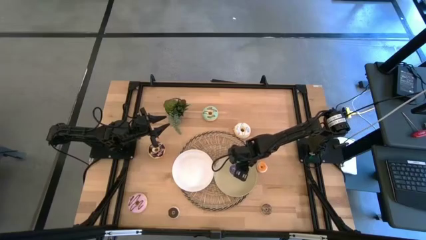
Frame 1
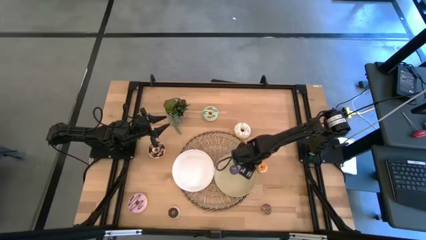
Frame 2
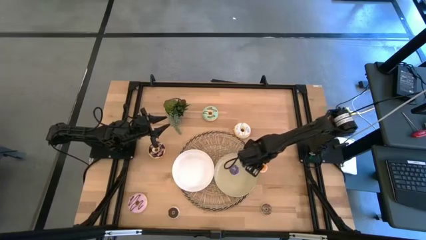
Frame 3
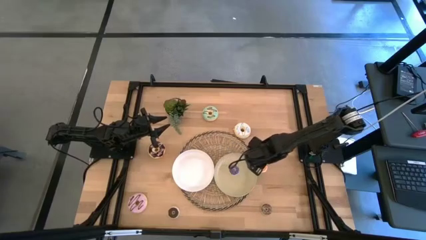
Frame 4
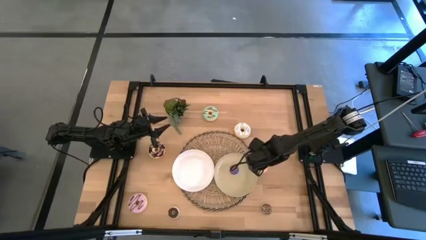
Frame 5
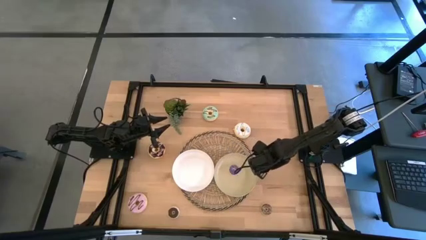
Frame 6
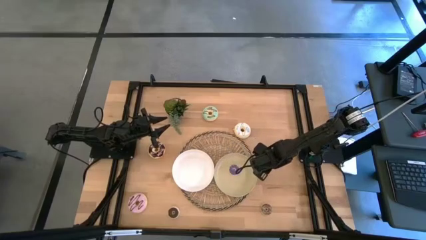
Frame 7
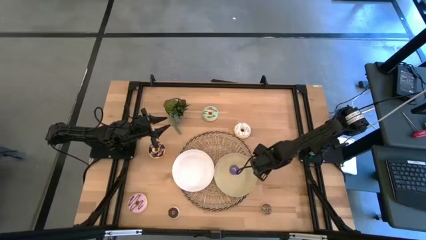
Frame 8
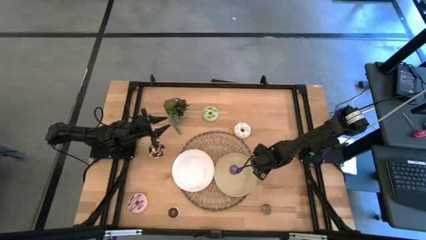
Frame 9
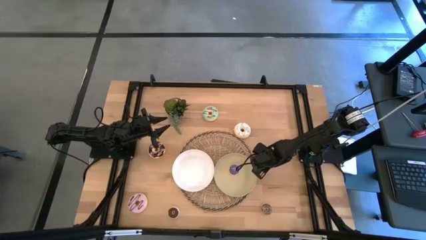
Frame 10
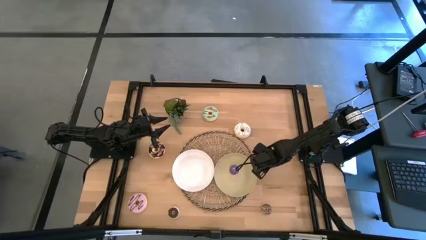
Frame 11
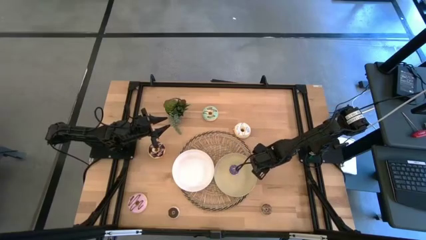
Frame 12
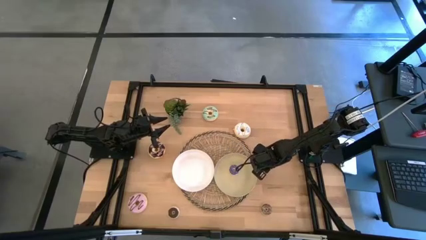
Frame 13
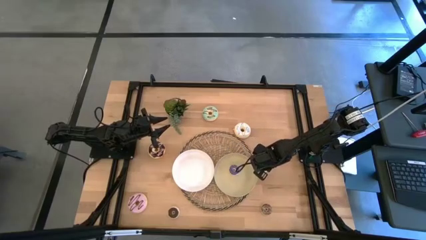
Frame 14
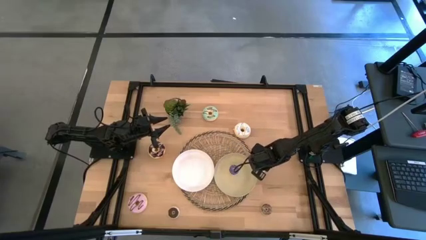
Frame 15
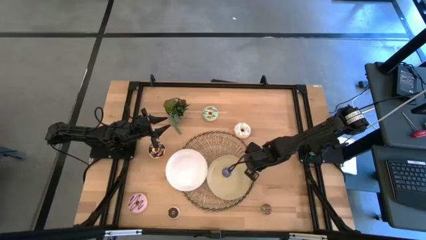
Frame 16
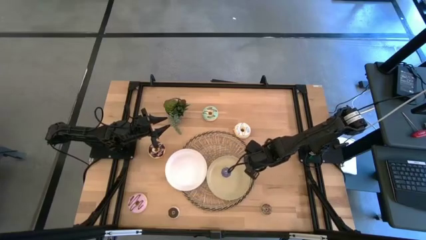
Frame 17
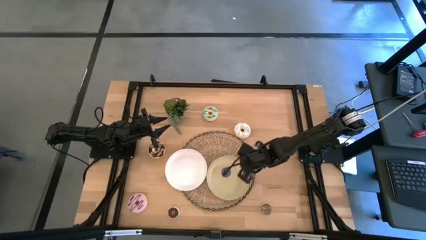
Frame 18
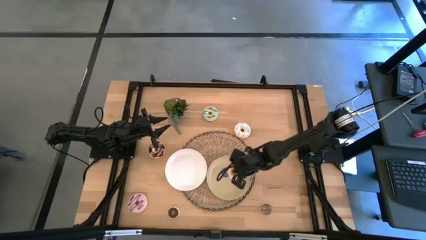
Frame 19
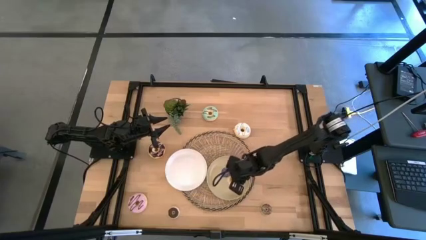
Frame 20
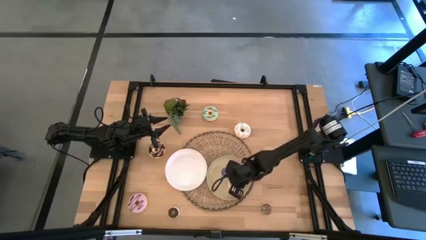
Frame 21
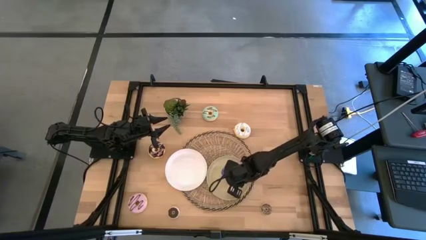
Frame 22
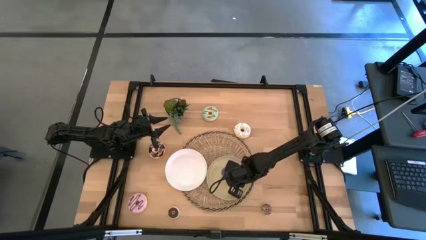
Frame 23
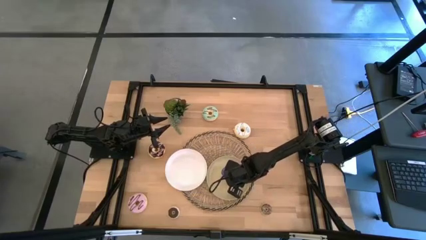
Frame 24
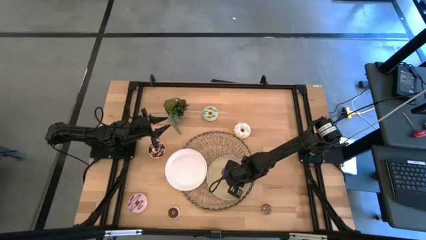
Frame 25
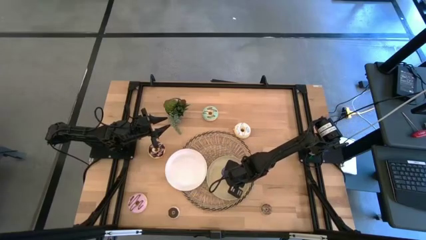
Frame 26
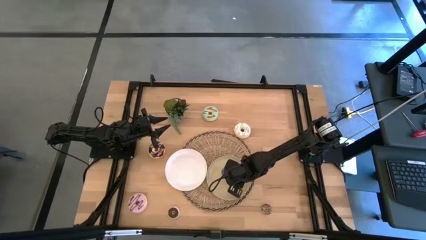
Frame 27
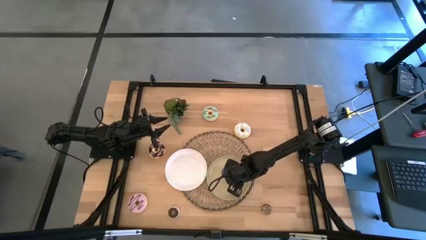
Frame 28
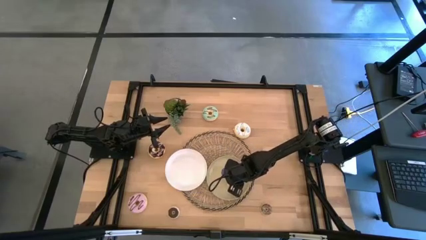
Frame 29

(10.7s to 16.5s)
Task: Pick & Place donuts
Put the small orange donut on the brown plate

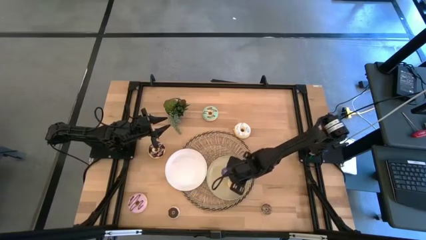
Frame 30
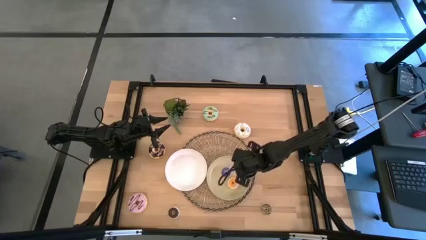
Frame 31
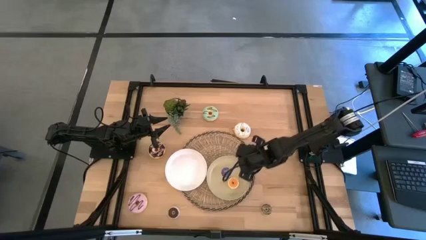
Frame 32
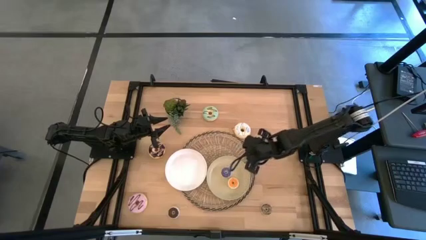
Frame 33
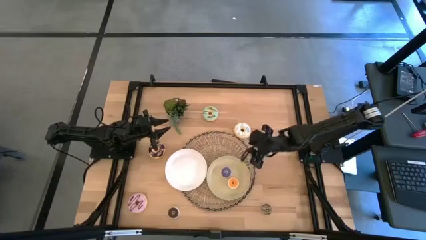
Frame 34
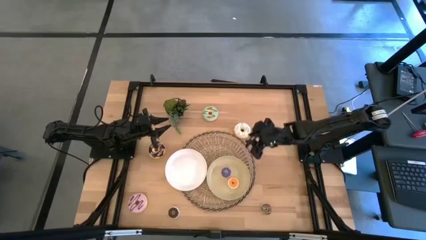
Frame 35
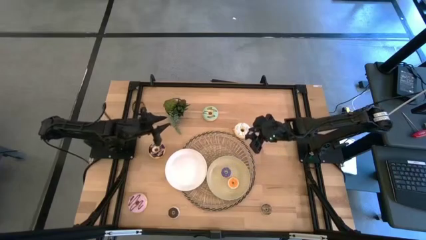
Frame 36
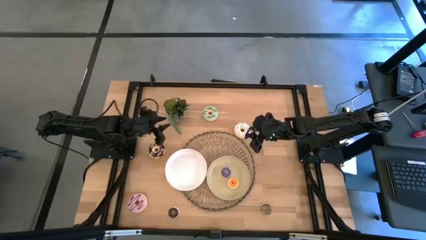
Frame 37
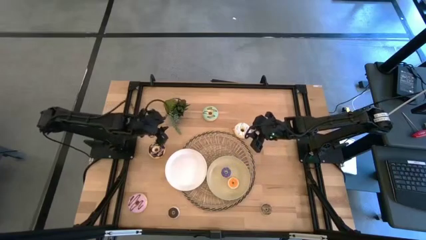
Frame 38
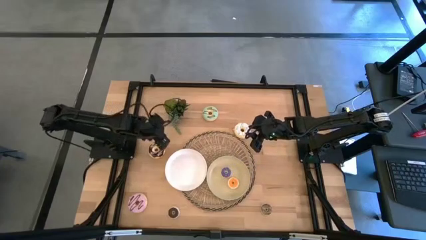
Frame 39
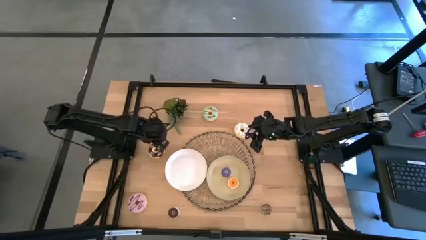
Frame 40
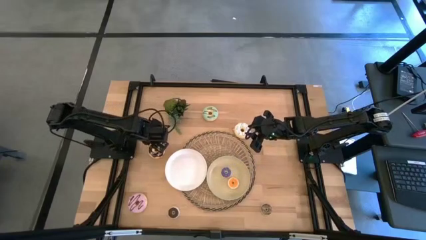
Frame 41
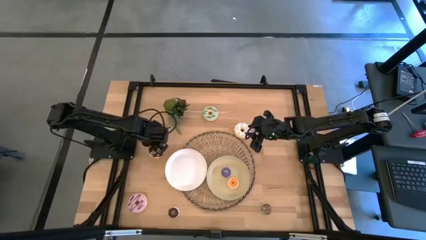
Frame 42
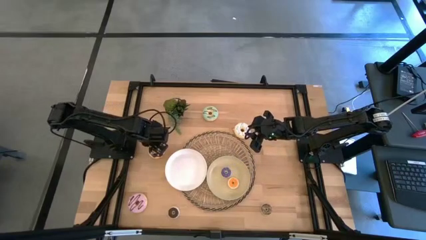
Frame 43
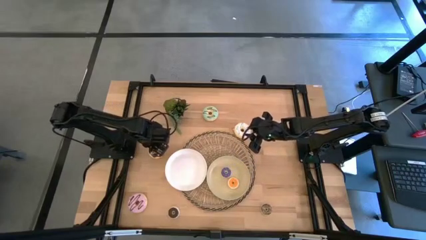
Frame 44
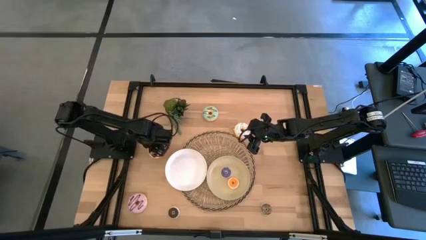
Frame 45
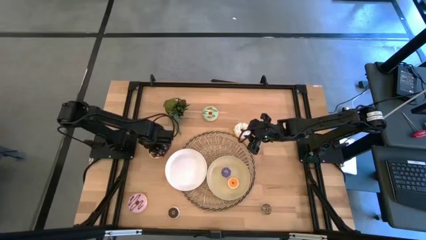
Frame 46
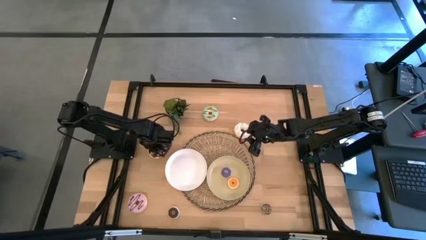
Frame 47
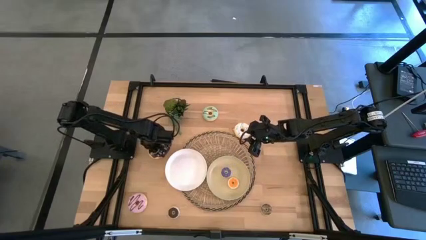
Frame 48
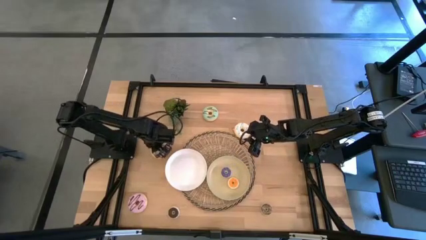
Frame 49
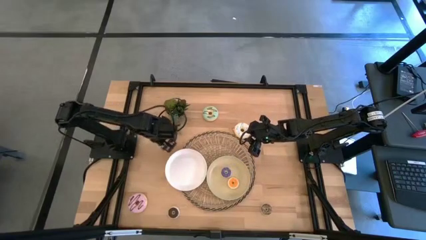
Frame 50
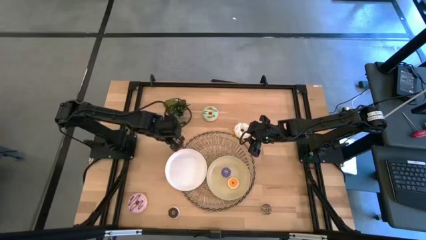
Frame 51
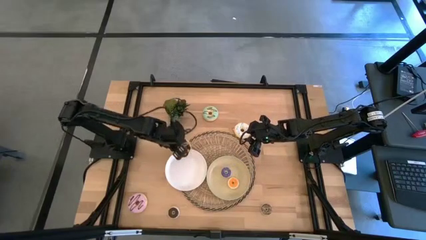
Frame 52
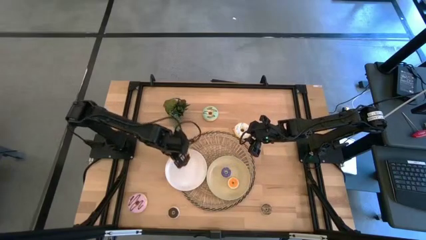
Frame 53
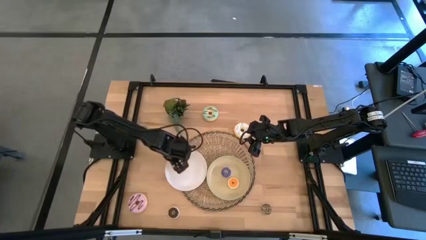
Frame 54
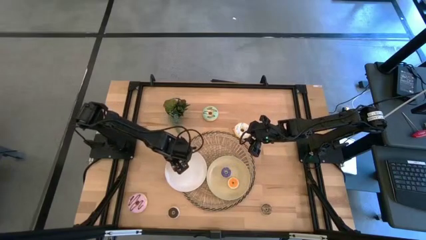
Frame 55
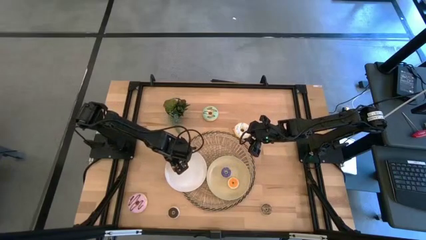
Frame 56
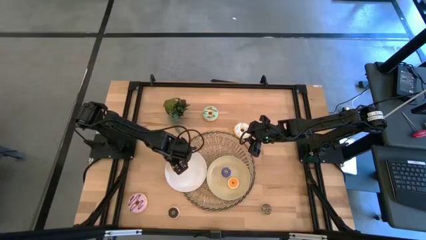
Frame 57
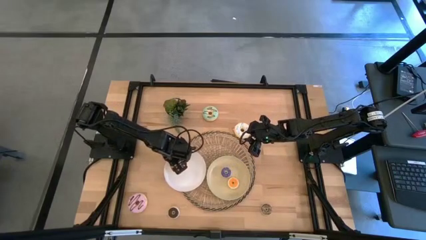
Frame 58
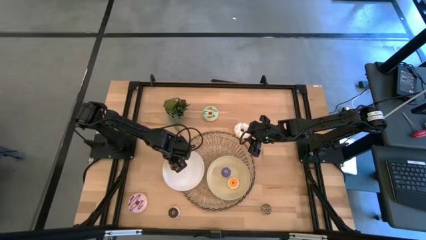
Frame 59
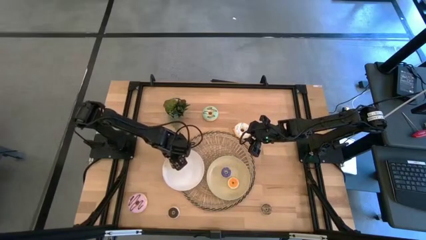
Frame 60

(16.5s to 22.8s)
Put the large black donut on the white plate

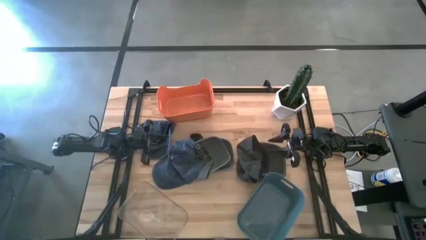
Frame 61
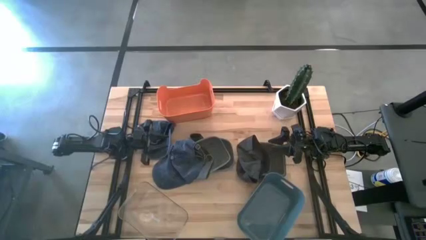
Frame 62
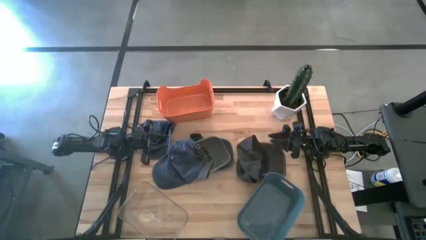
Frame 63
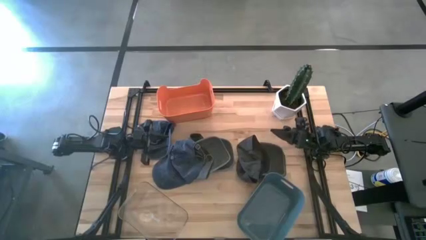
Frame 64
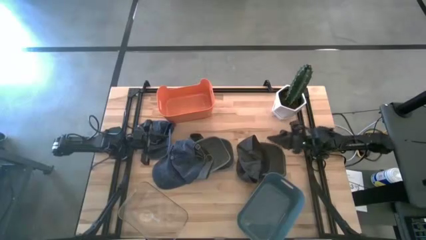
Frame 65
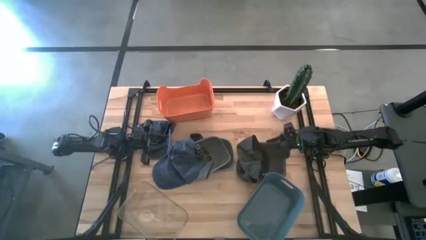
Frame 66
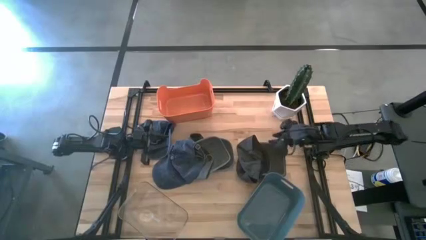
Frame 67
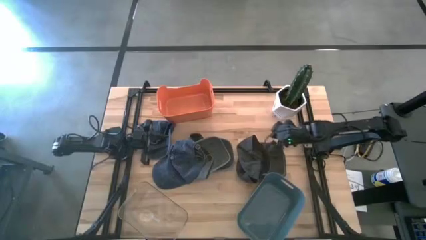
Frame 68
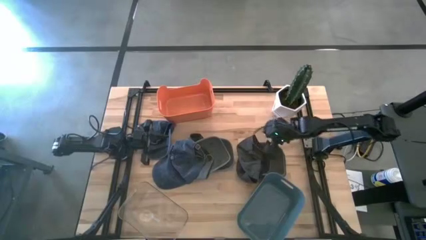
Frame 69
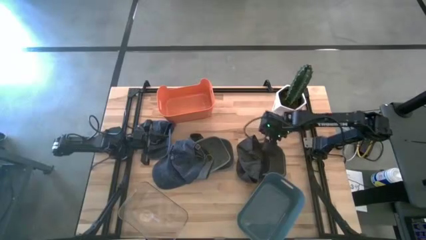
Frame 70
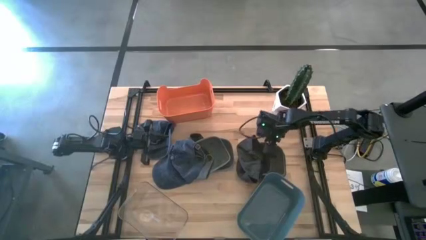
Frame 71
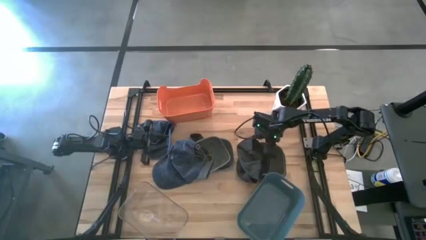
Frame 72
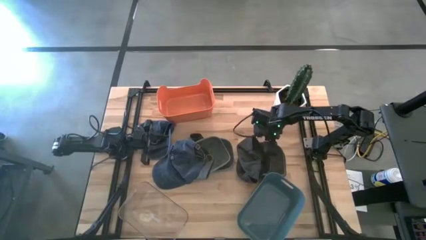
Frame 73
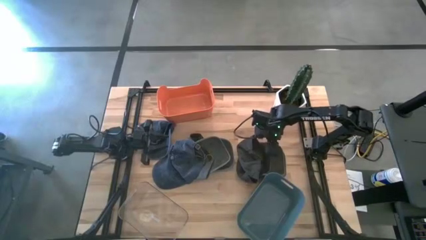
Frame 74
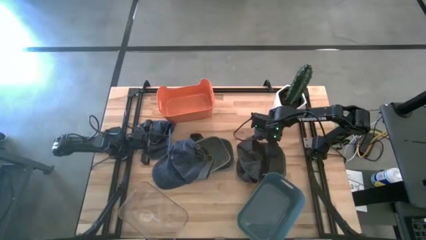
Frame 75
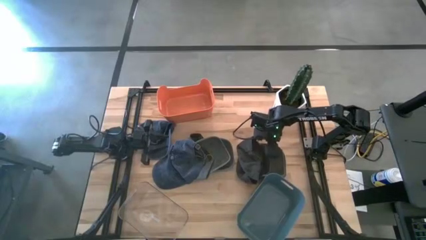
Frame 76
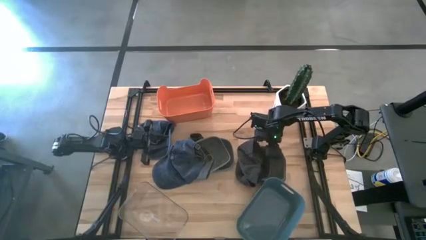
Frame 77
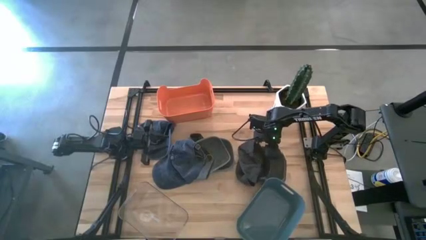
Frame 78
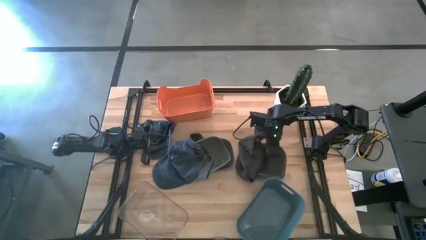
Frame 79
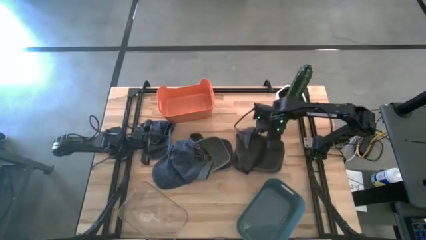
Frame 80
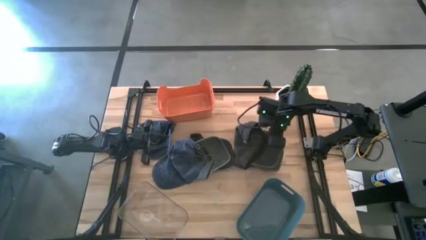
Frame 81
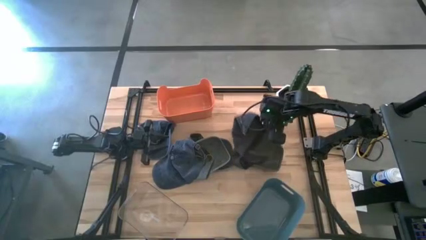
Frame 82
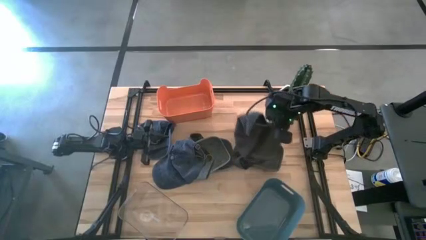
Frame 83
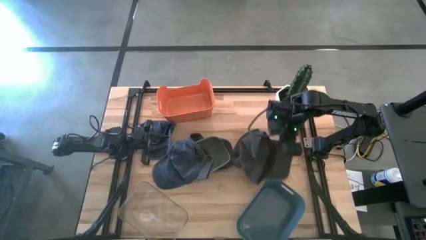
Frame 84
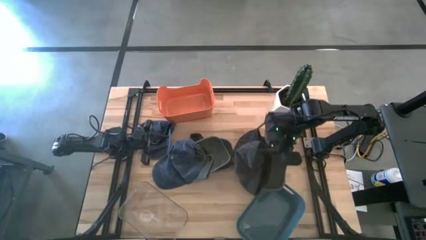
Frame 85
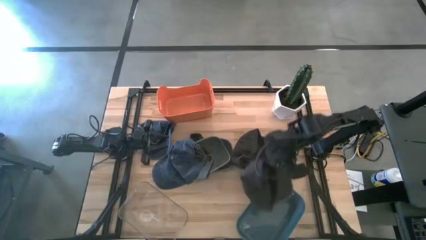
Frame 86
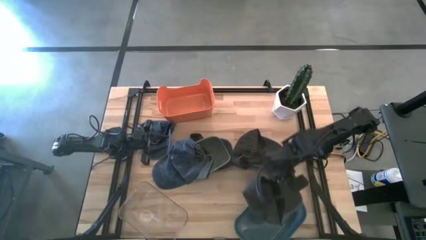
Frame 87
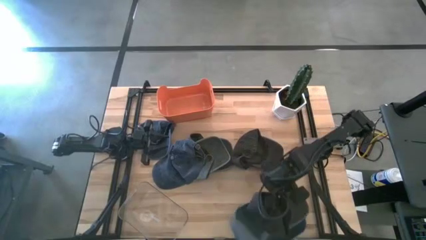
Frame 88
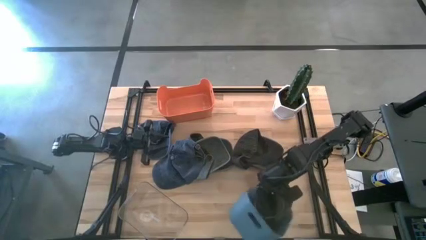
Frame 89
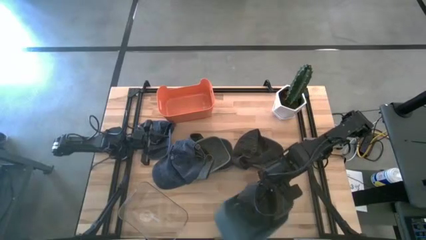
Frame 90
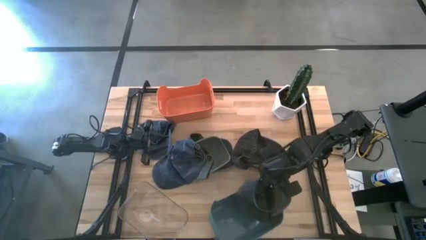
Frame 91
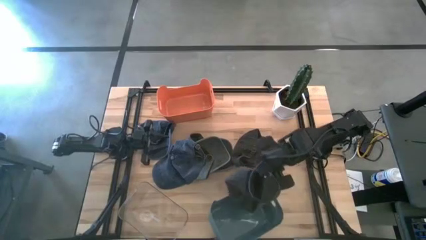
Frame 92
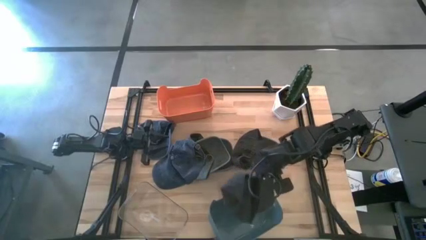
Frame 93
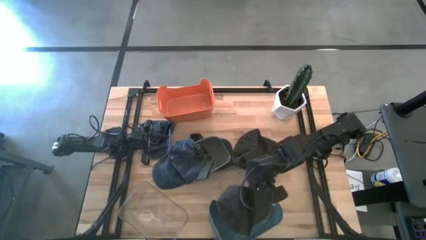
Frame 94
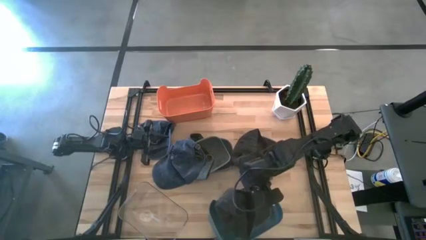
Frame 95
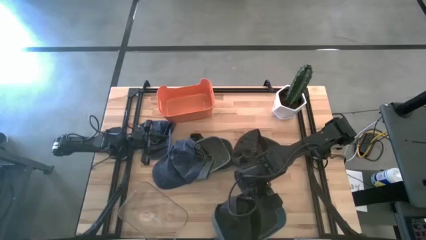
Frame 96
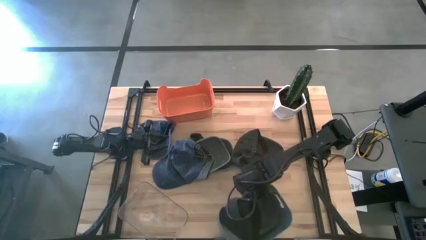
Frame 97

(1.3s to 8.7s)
Task: Pick & Place hat
Put the top black cap into the blue bin
